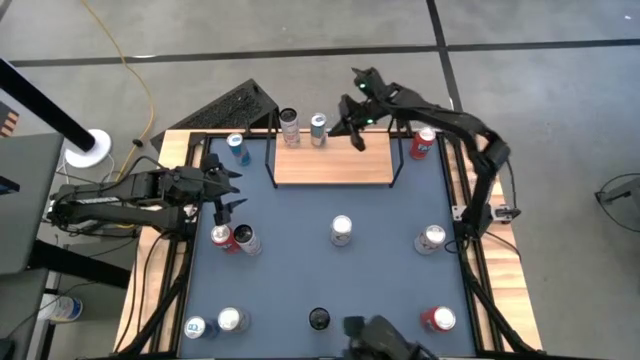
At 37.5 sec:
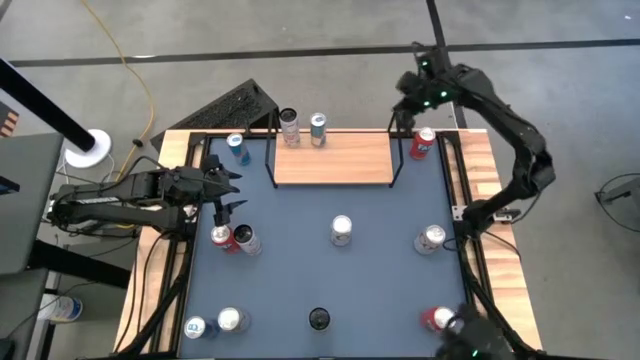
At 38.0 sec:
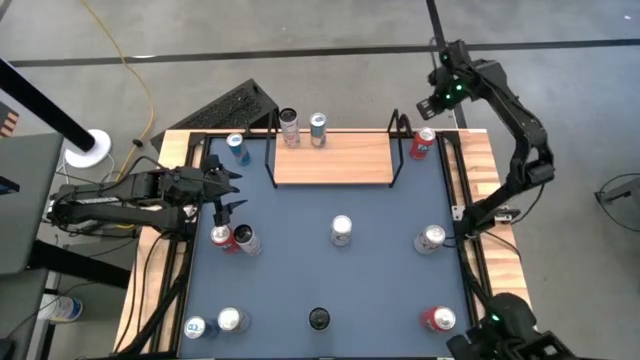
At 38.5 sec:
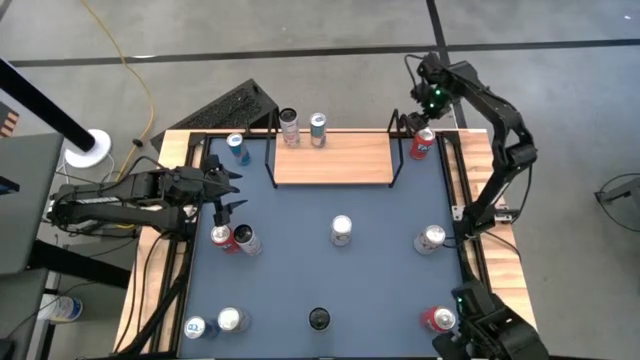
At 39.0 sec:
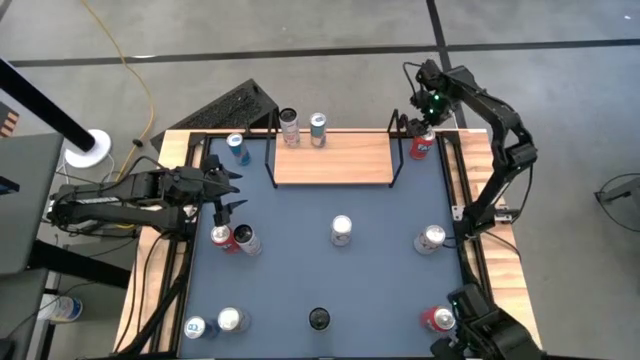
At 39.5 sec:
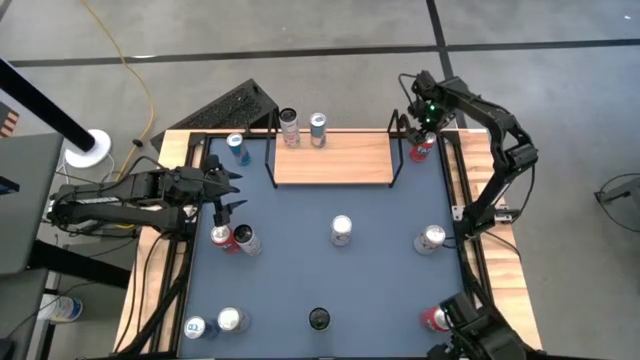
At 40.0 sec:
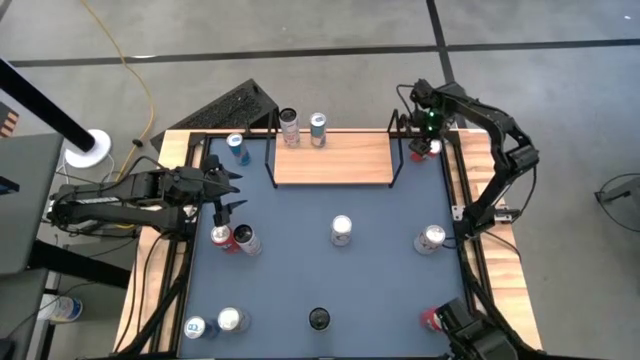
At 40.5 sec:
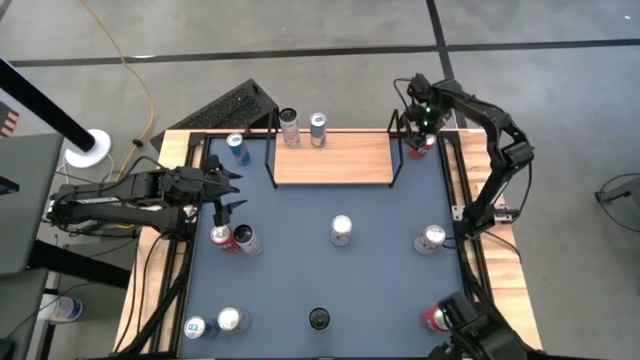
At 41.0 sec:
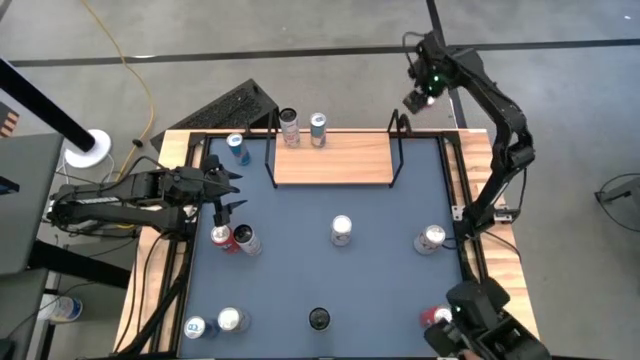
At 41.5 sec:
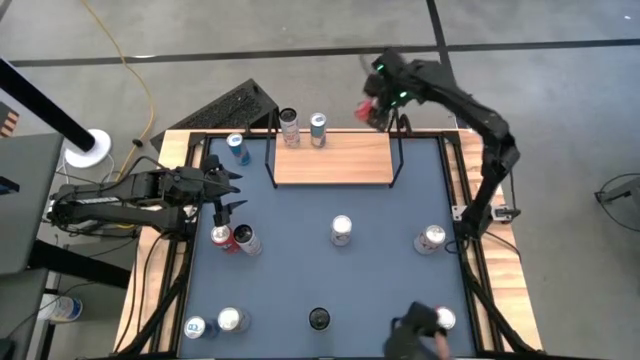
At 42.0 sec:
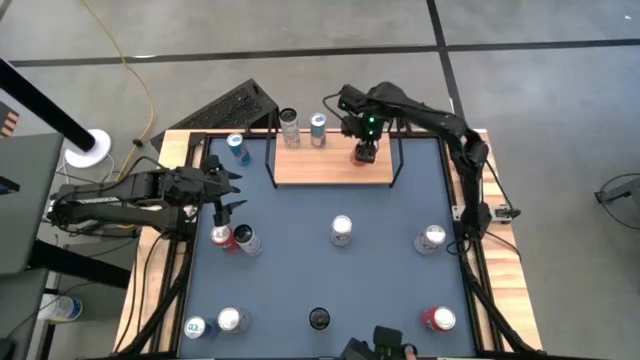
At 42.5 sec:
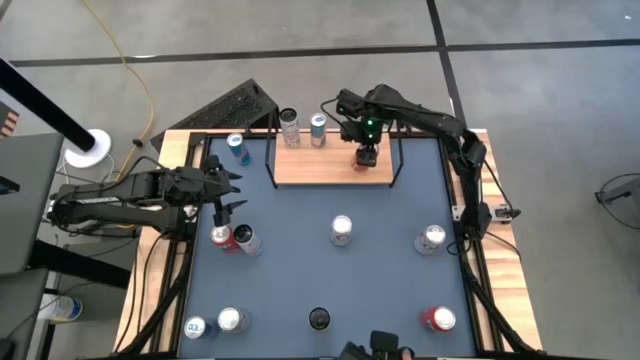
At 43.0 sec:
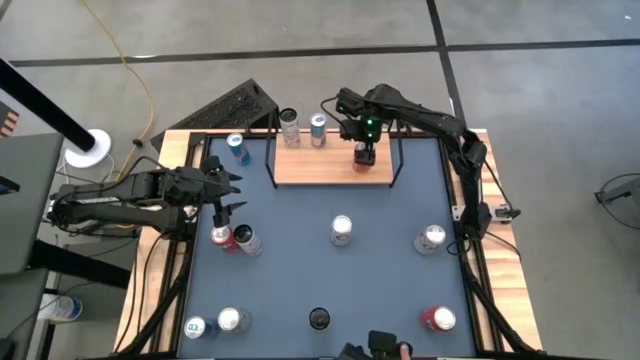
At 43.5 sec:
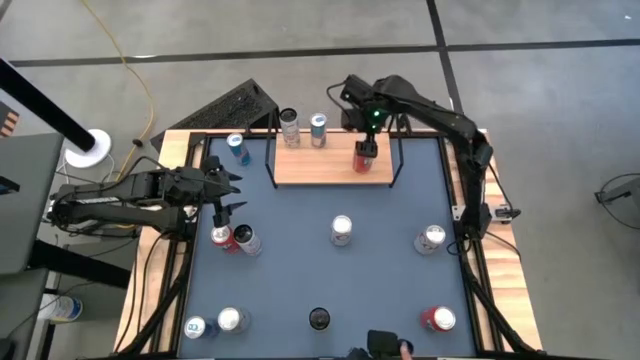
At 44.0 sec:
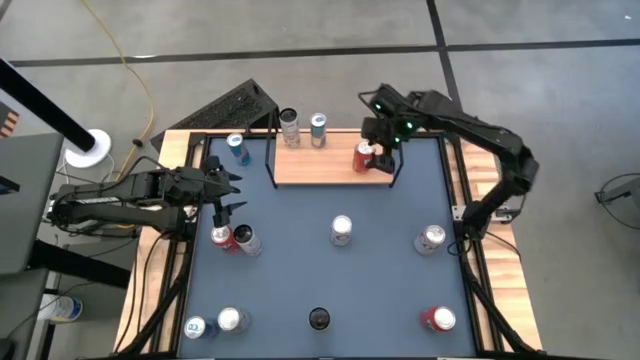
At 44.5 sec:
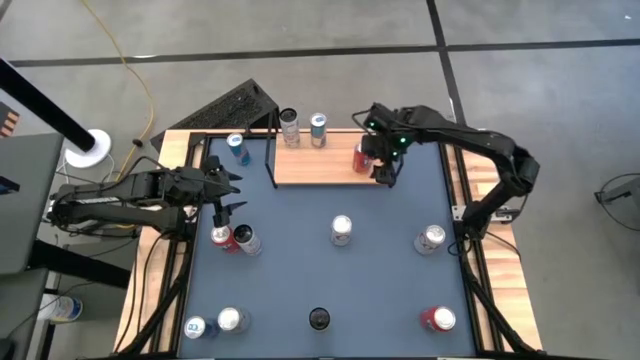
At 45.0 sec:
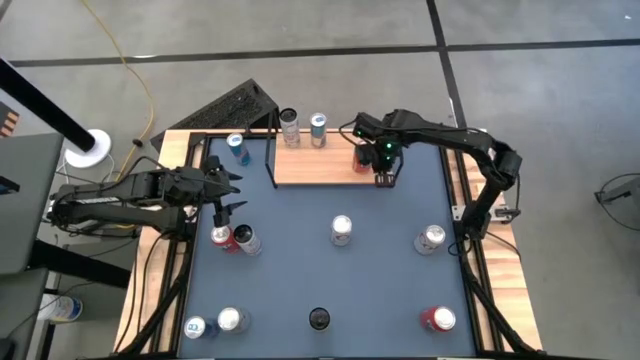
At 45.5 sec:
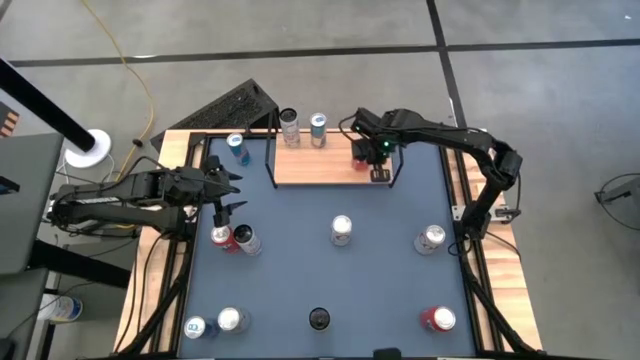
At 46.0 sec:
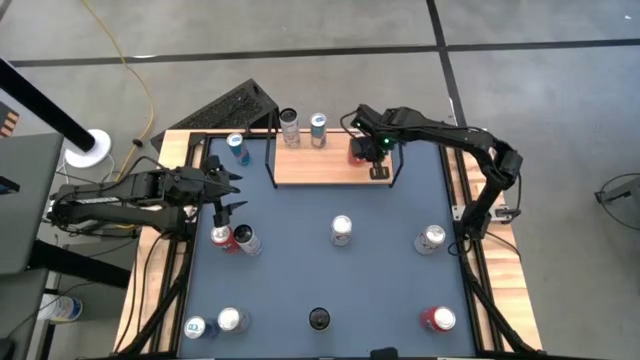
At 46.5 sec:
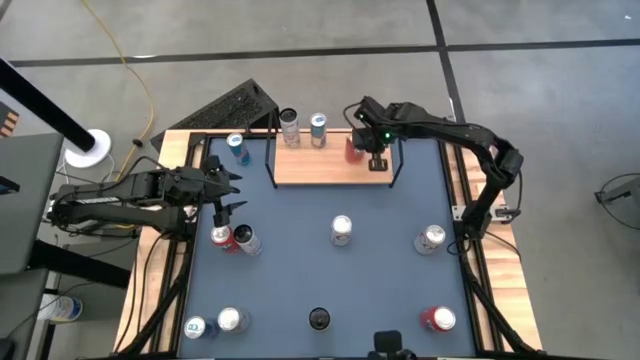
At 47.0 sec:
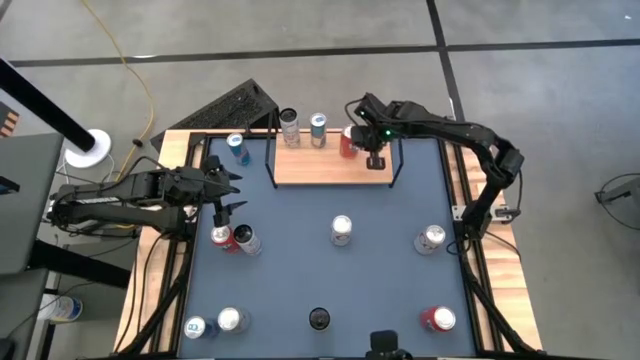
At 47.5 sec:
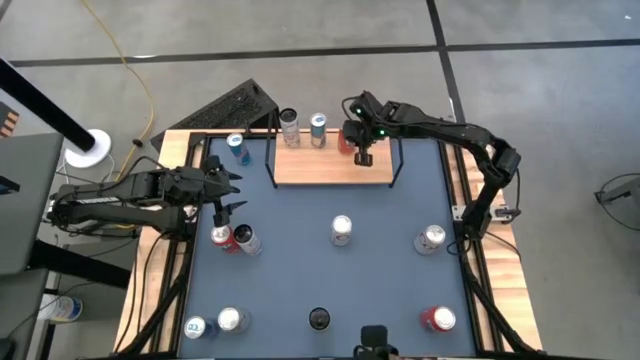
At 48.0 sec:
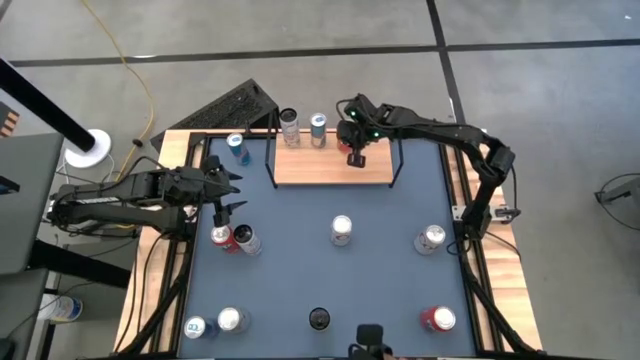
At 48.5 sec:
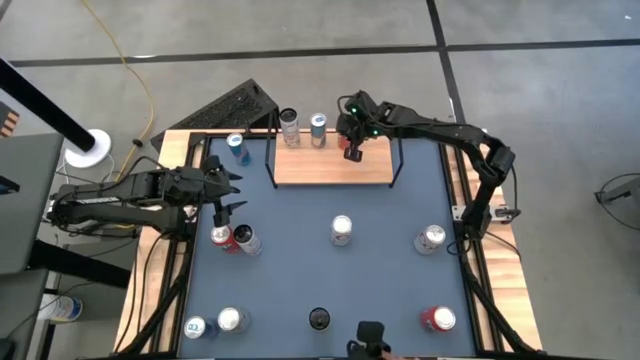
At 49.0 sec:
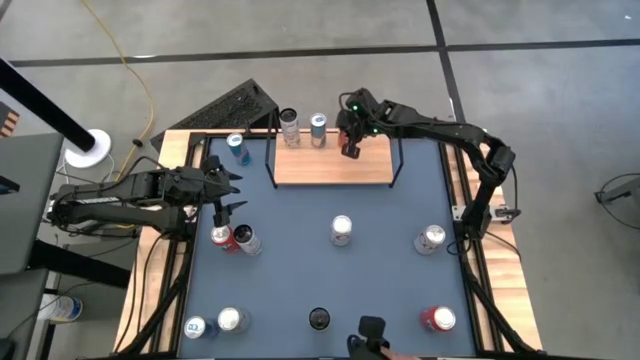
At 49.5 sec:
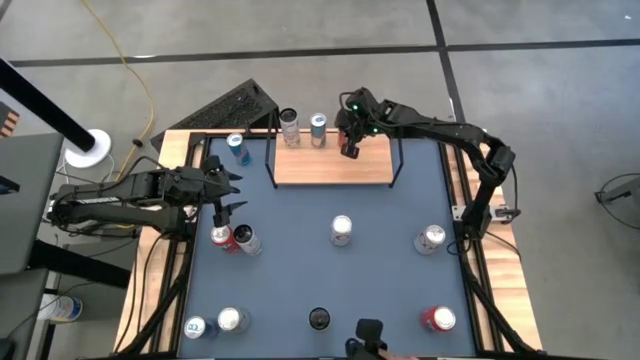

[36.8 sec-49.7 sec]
Task: Place canned beverage on shelf
Put the top red soda can on the shelf

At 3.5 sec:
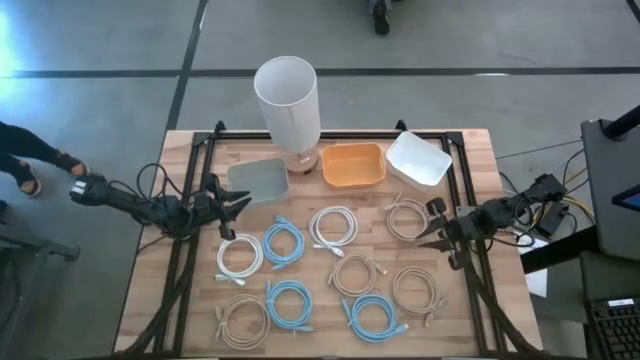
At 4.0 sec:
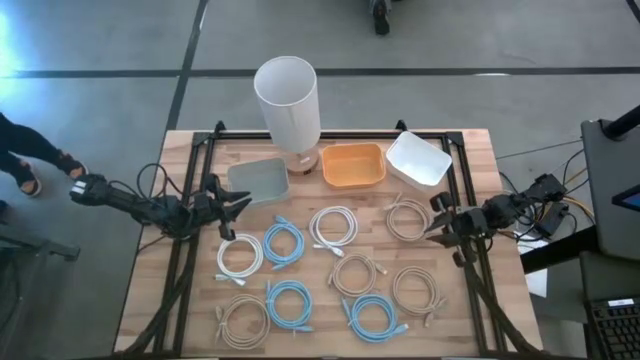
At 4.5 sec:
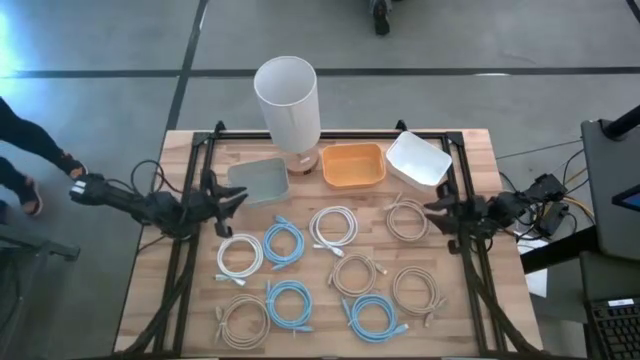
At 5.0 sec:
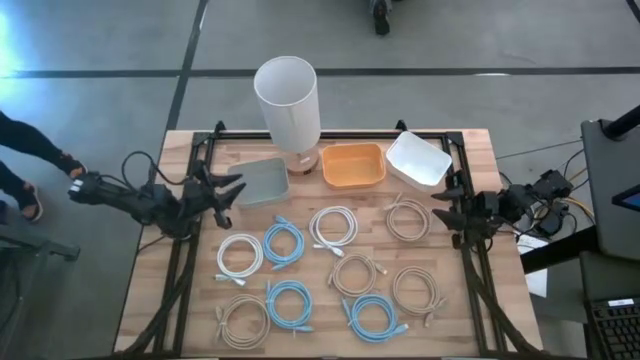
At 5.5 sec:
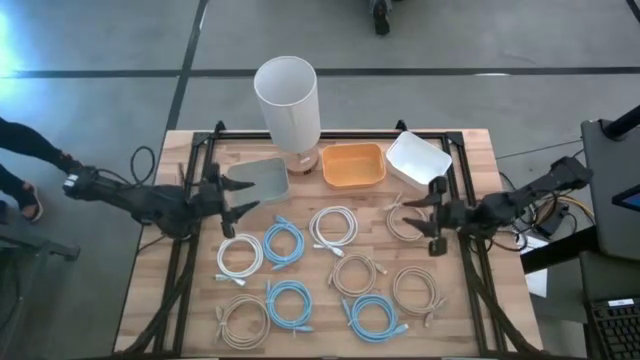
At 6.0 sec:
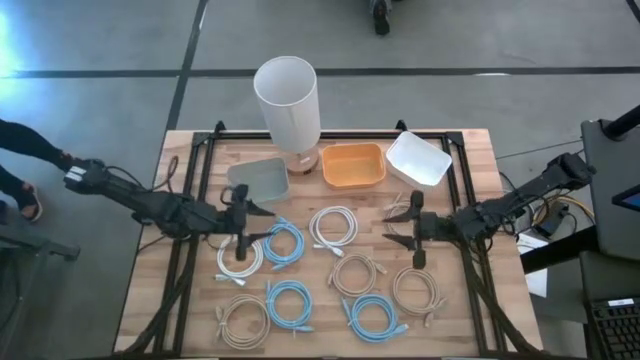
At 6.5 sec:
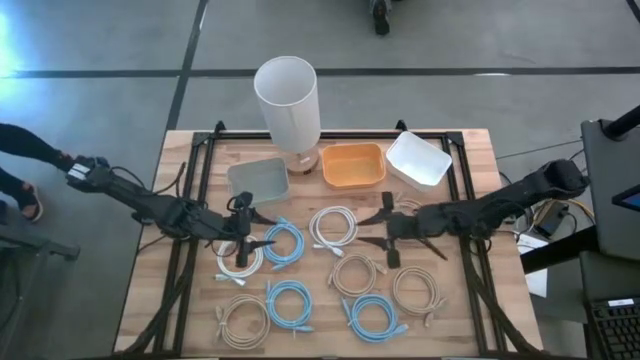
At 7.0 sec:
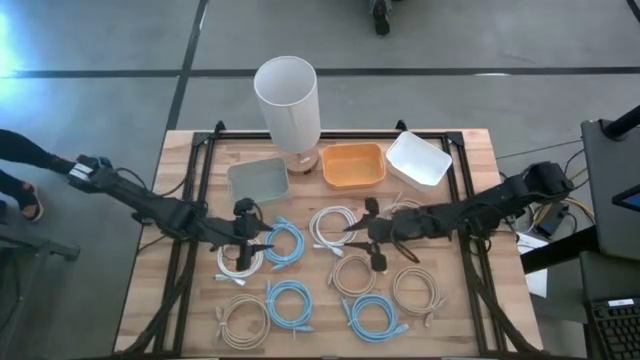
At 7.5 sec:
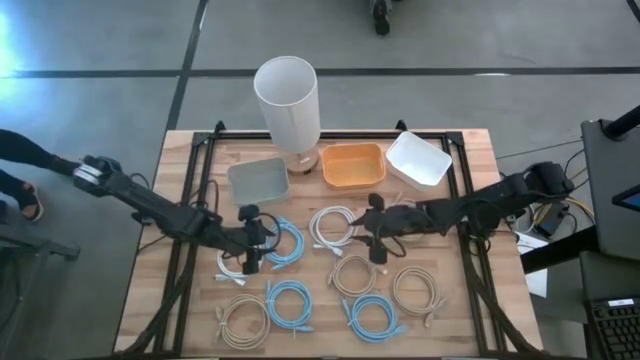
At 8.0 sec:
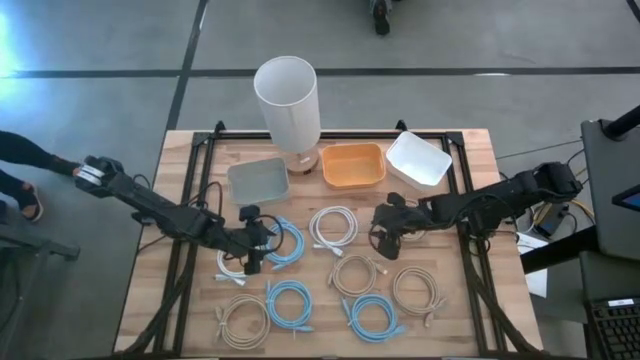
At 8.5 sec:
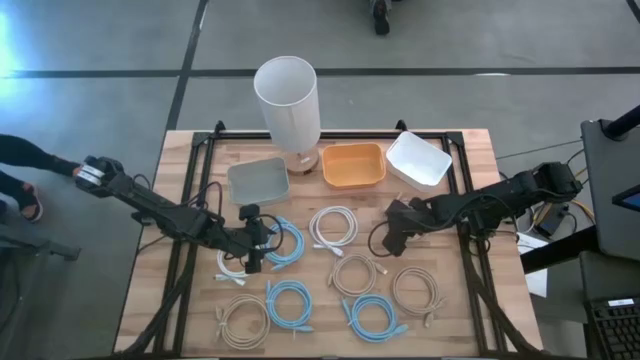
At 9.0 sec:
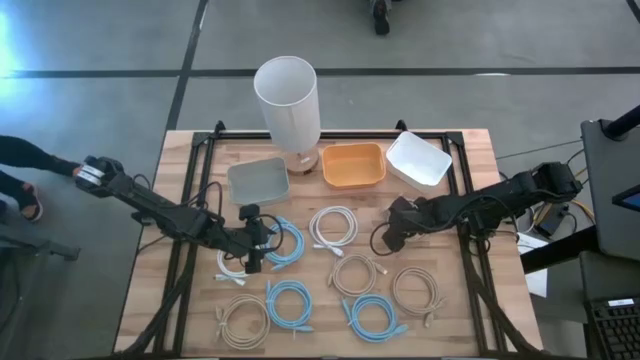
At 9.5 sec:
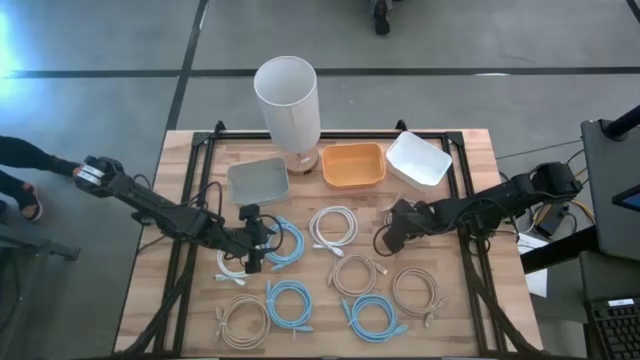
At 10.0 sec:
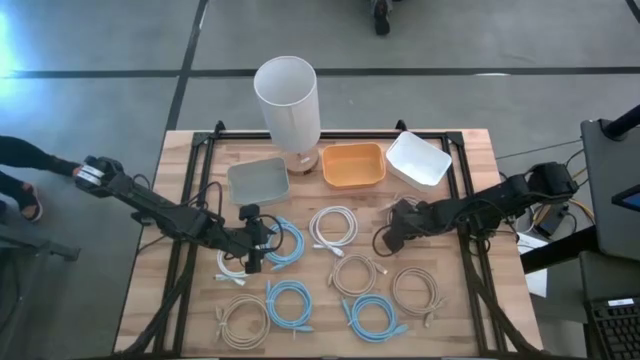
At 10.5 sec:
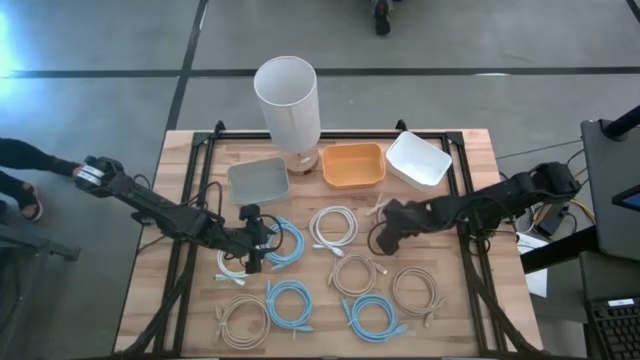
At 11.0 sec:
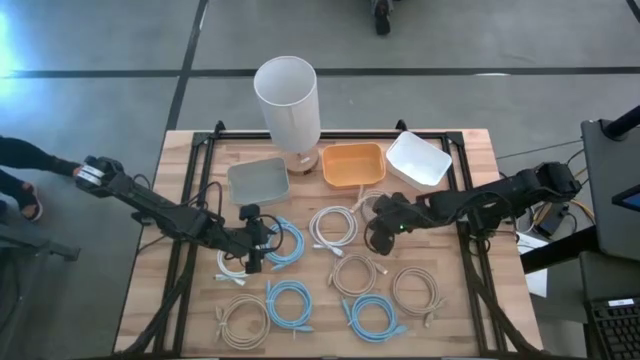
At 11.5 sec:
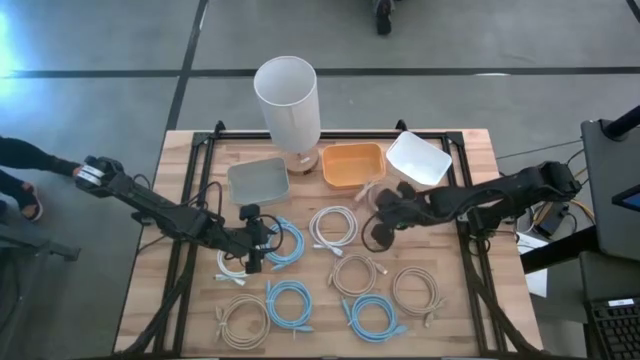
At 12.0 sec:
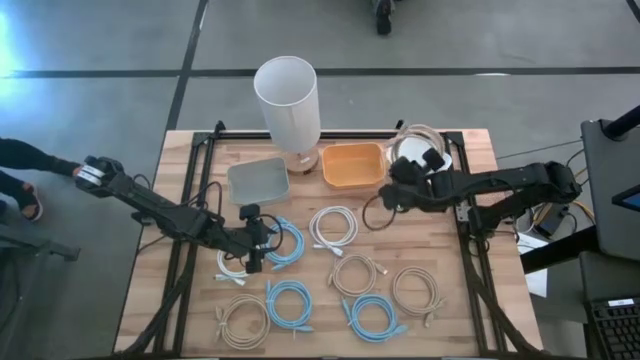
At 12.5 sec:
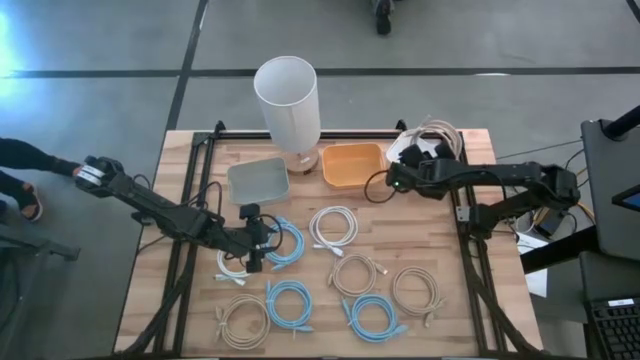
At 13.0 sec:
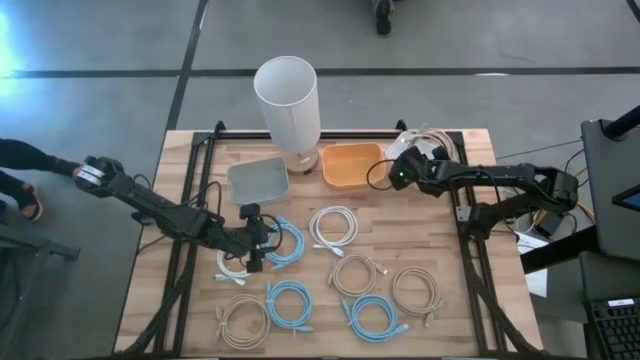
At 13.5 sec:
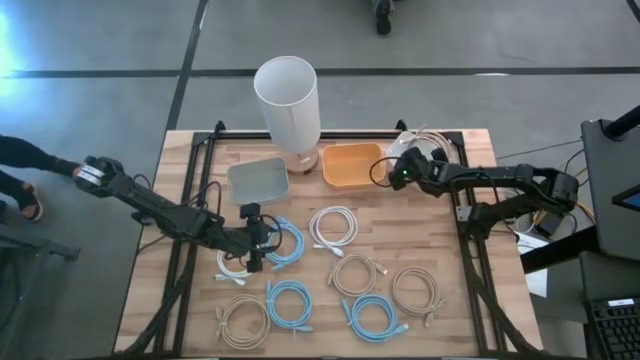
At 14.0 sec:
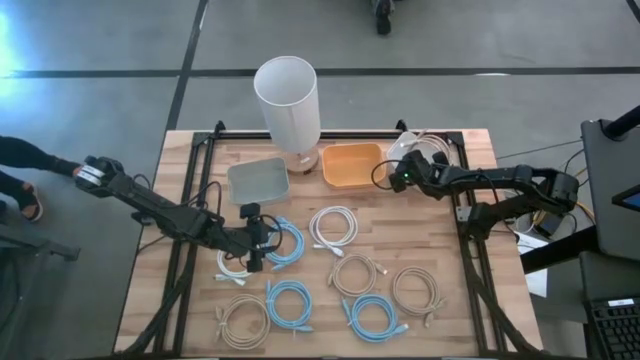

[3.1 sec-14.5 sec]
Task: Sort HDMI cables
Put the brown HDMI cable into the white bin
